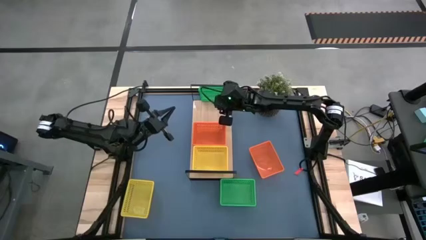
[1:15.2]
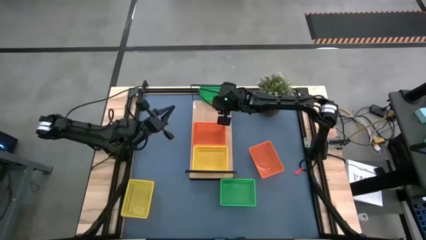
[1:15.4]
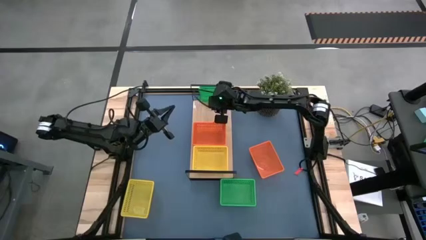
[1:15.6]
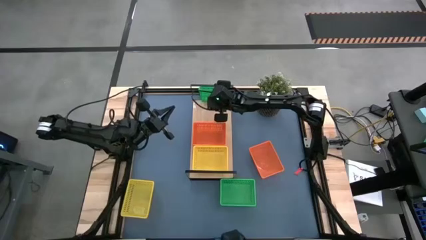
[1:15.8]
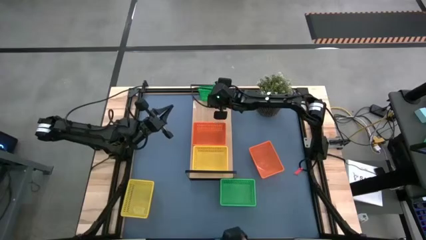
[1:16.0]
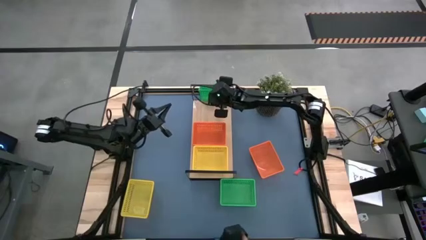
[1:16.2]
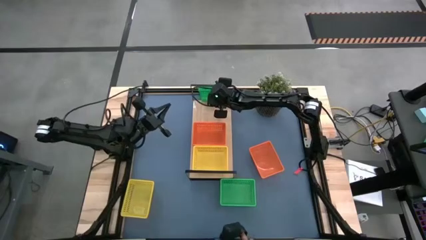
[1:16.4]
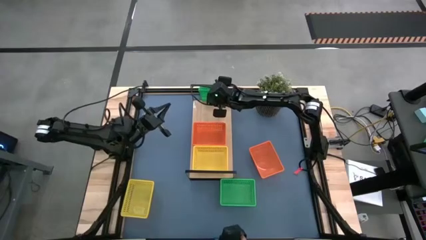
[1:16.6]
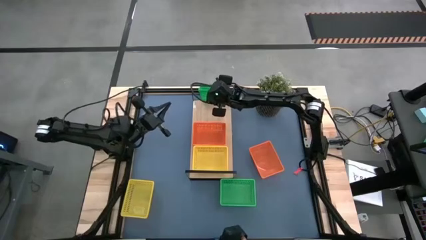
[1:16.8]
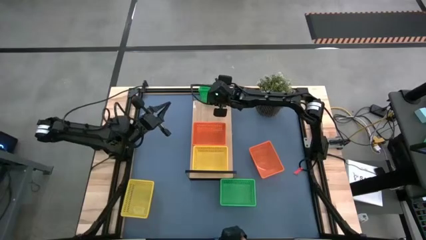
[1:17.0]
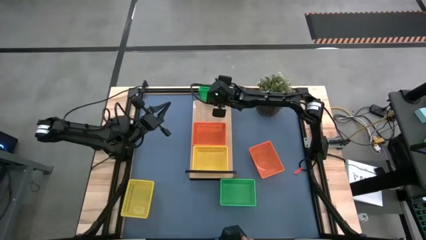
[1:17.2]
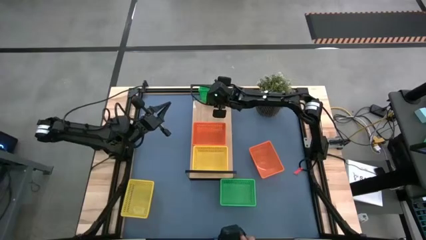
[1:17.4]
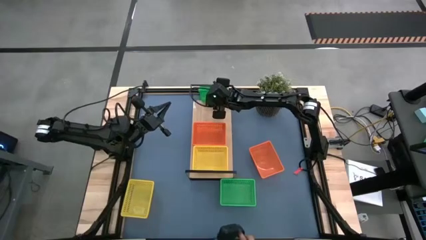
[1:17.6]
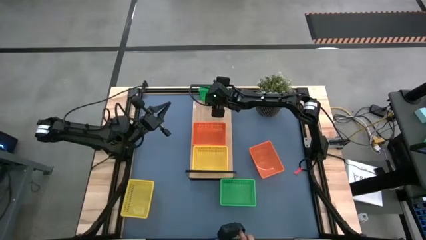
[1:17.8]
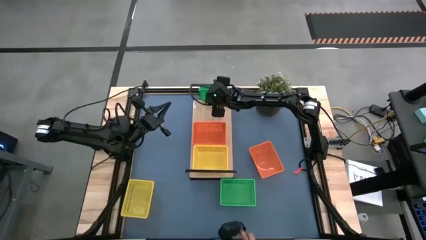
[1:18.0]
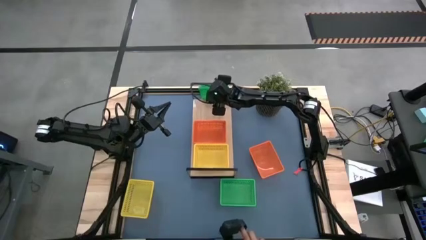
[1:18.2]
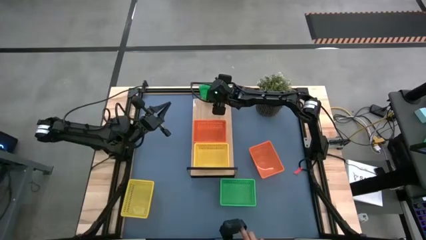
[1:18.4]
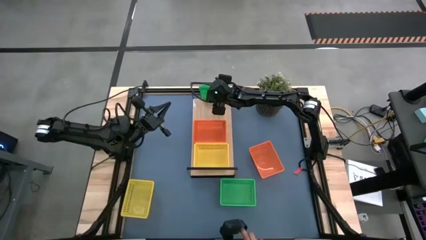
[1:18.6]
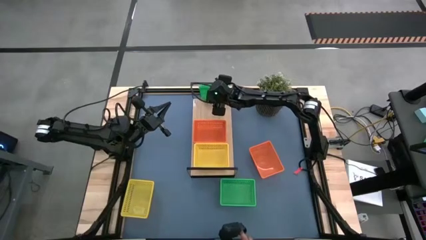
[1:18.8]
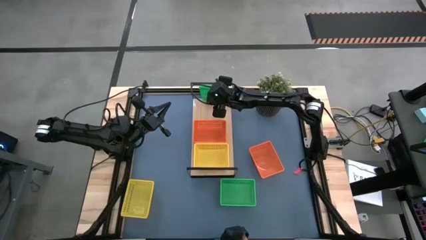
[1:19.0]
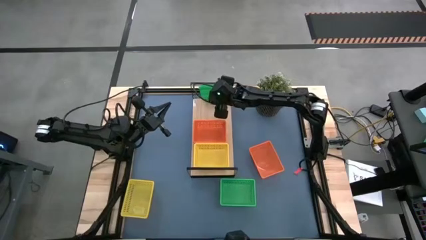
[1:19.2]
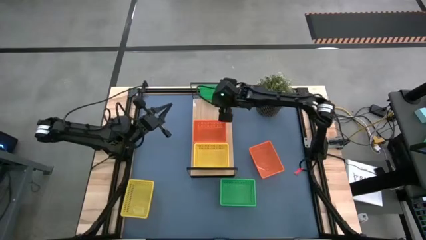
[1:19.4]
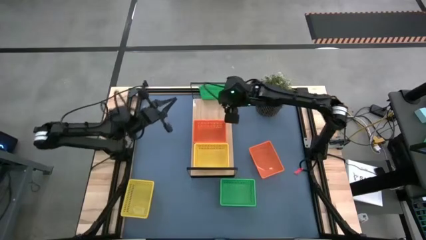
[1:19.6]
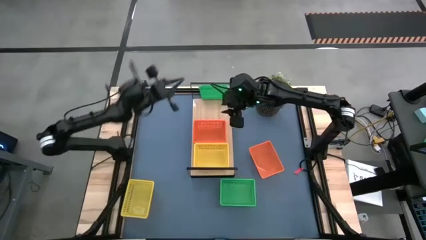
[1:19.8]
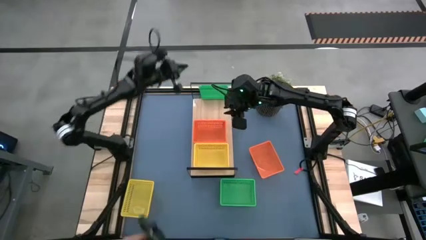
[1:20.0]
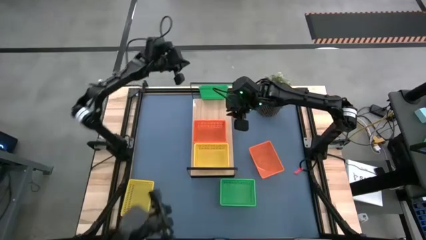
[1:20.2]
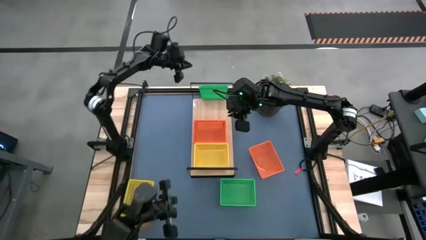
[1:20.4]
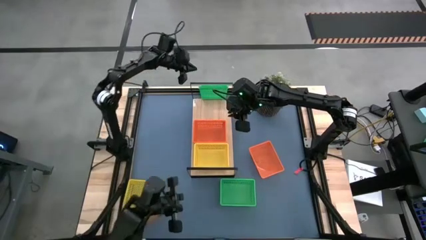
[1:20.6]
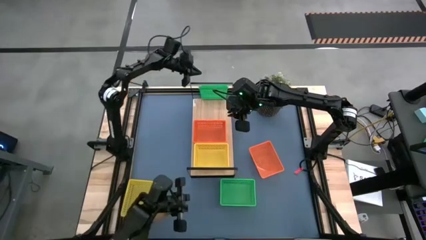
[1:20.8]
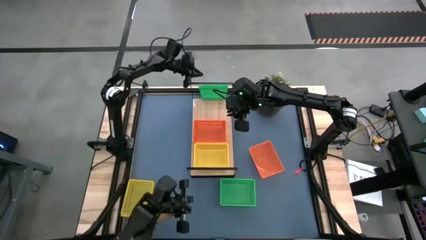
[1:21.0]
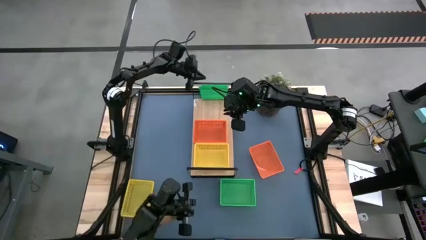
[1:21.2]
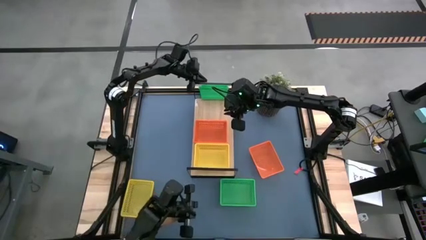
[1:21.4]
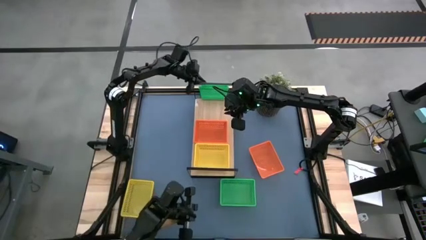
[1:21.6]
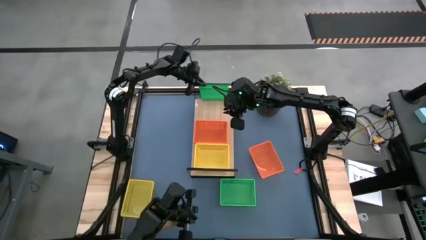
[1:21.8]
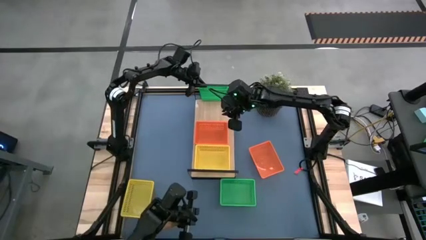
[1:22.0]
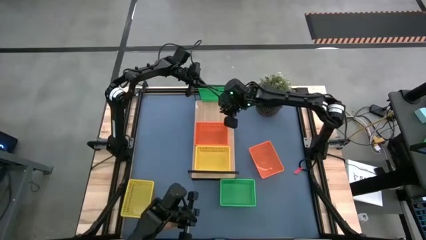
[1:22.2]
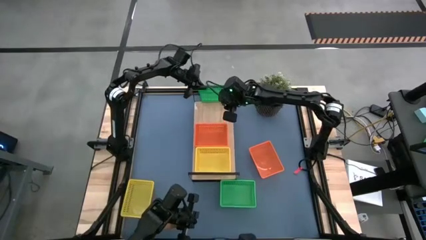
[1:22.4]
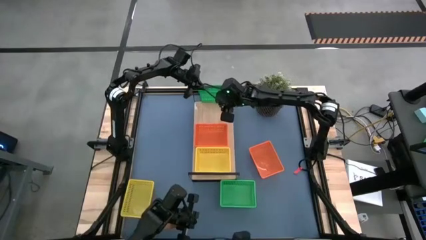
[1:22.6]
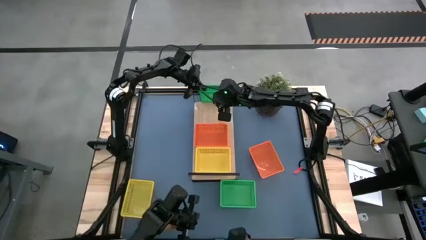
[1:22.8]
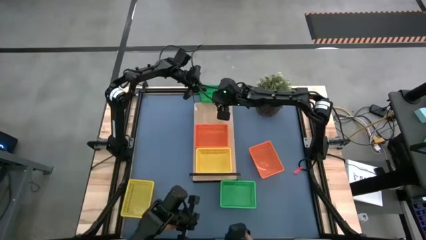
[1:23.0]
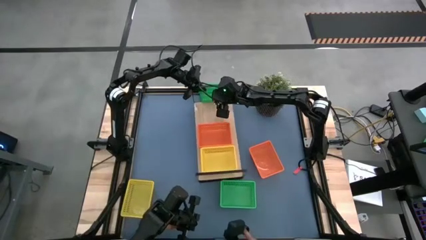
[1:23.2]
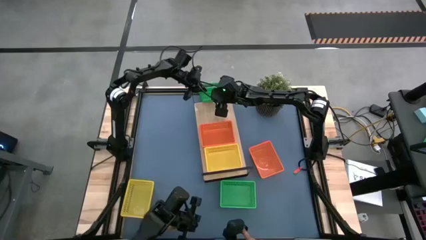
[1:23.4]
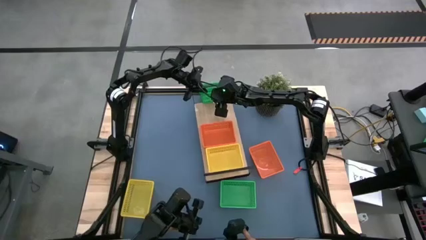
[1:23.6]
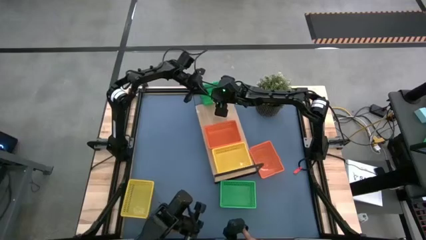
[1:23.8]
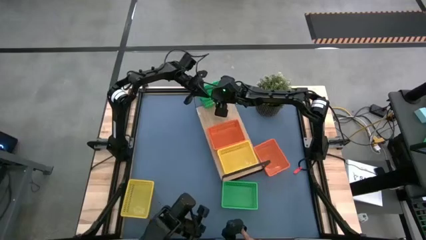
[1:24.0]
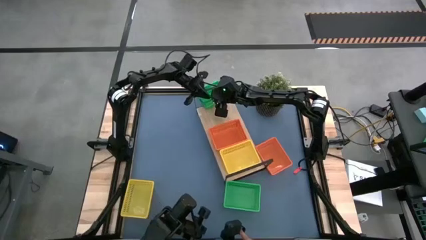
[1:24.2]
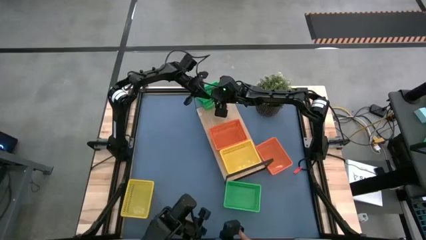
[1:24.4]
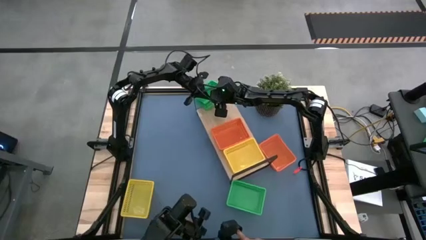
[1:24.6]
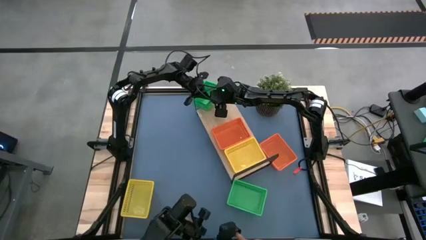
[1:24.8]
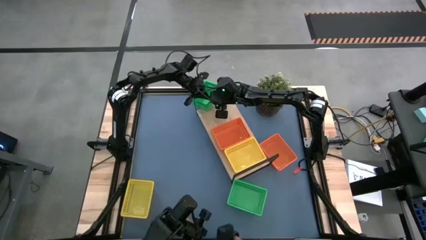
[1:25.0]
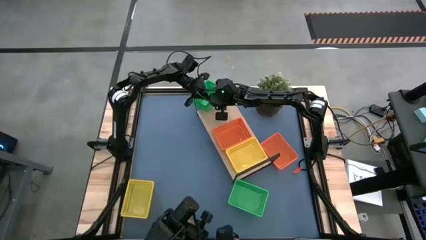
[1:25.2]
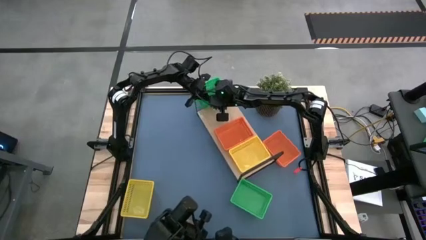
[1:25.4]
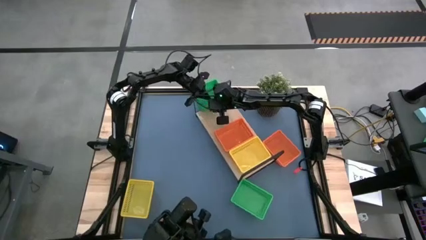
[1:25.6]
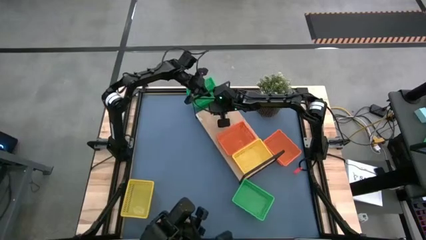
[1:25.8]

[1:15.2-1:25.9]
Task: Stack baskets on shelf by color
Stack the top green bin on top of the green bin on the shelf

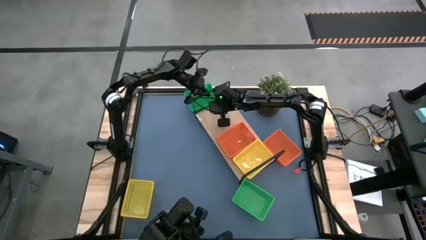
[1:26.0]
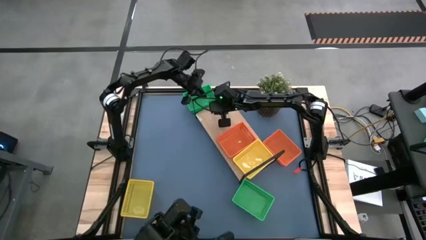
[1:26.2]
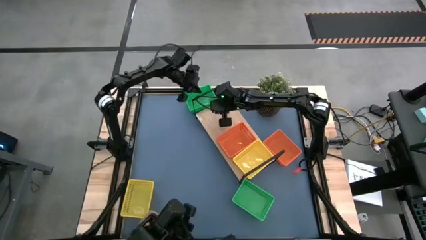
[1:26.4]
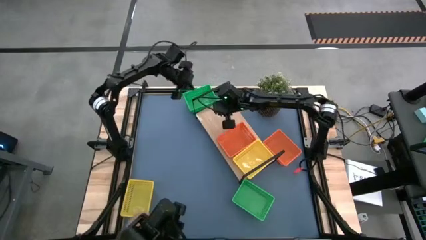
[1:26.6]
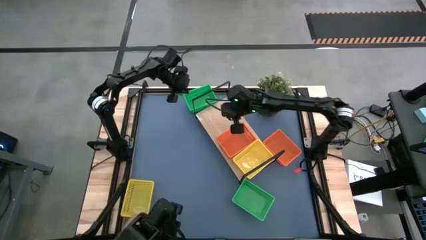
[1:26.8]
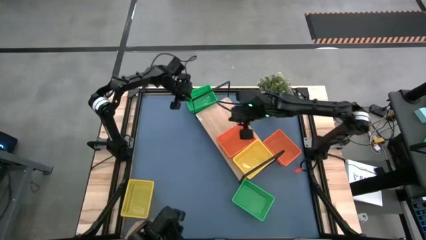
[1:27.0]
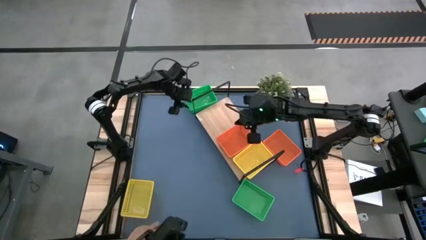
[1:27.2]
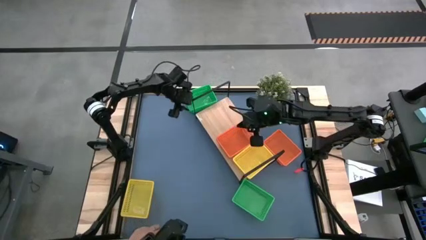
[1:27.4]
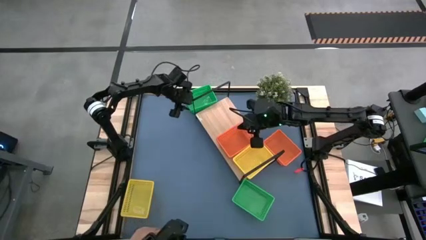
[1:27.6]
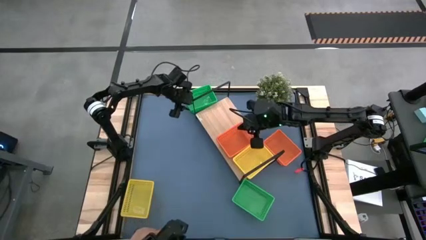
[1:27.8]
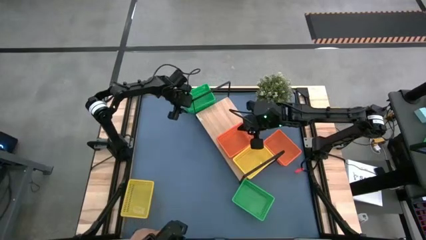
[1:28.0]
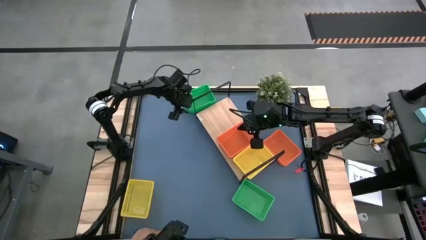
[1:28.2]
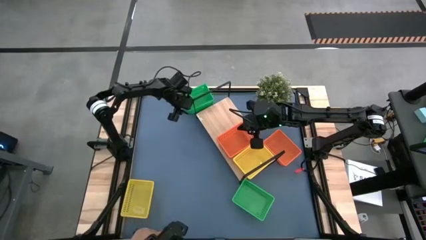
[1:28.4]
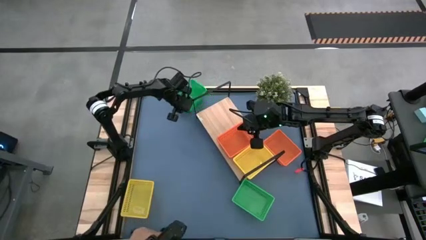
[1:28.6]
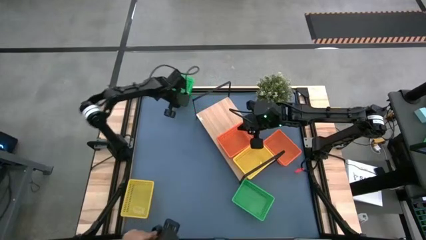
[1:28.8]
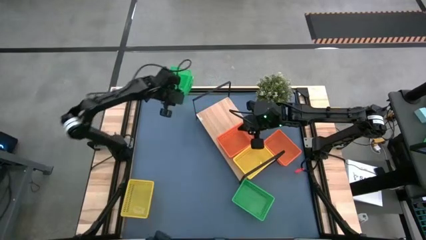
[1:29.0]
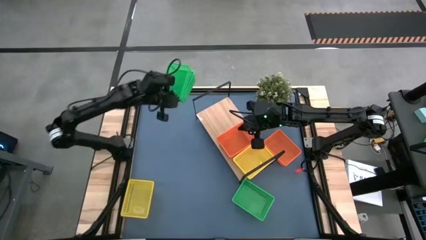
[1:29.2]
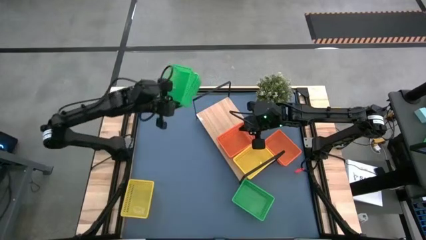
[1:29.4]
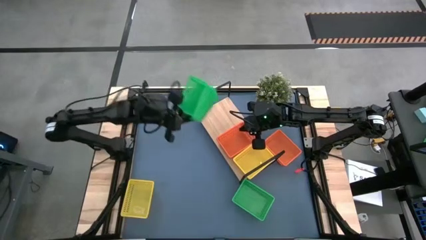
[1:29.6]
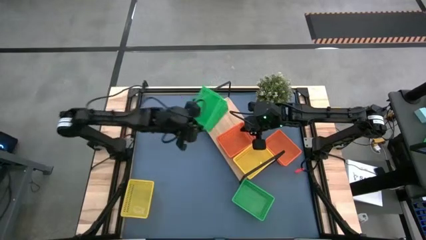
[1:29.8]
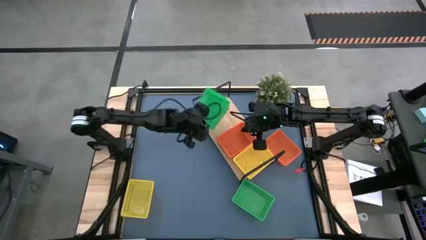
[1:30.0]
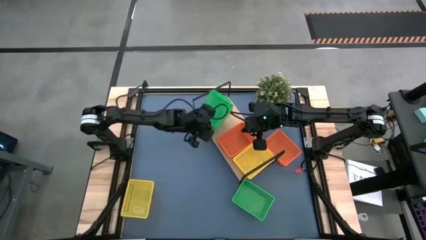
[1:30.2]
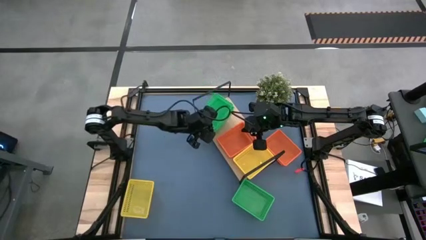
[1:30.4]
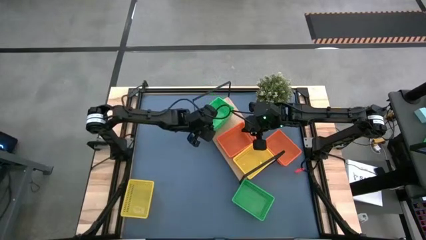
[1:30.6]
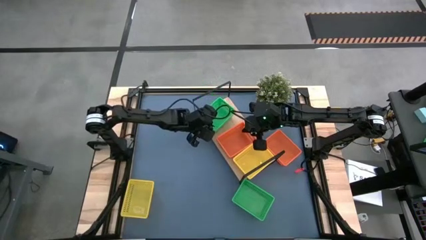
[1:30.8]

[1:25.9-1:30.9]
Stack the top green bin on top of the green bin on the shelf

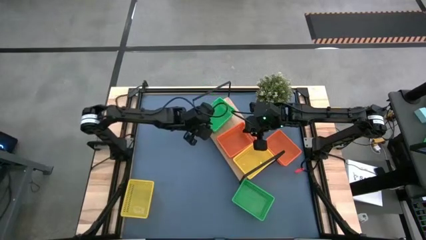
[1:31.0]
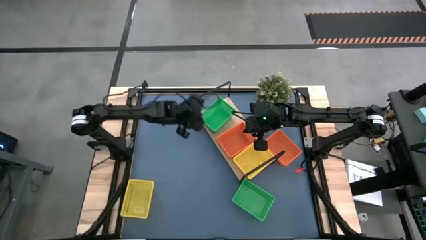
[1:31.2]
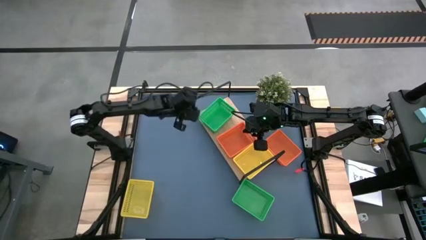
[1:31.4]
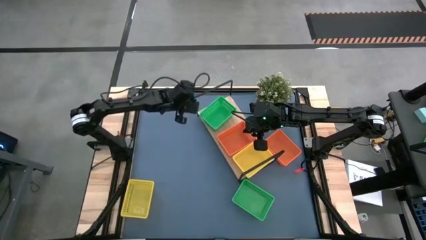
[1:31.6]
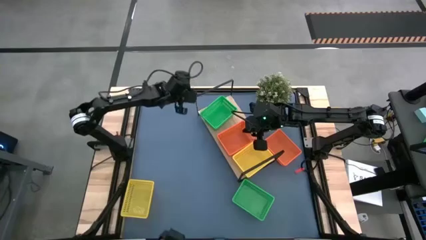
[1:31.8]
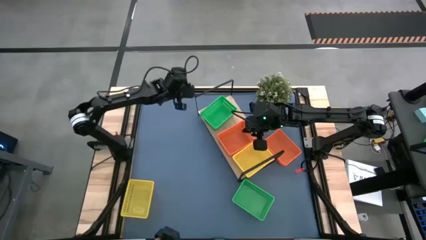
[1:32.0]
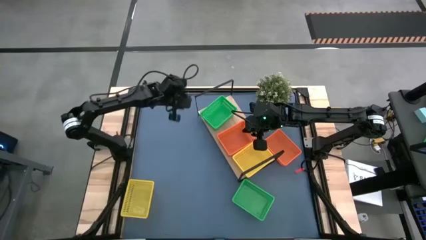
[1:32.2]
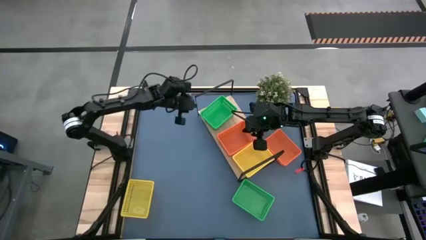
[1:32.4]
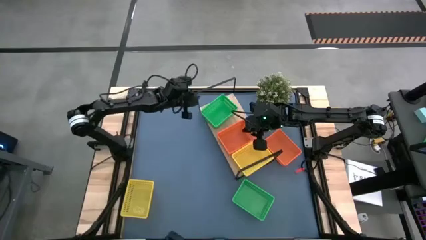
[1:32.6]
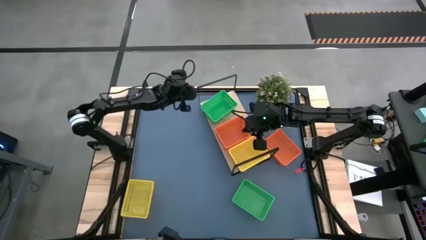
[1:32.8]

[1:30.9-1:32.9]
Adjust the shelf on the table
